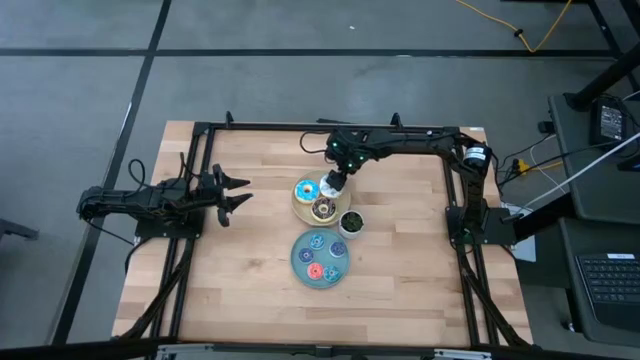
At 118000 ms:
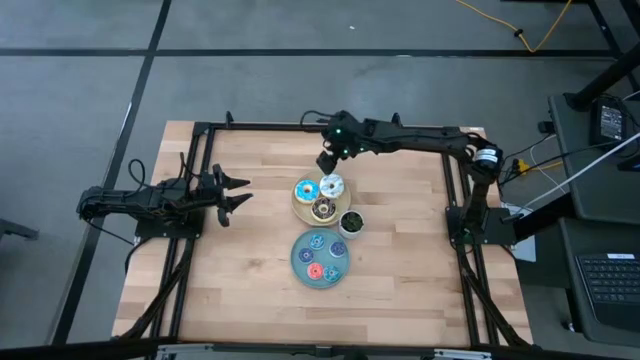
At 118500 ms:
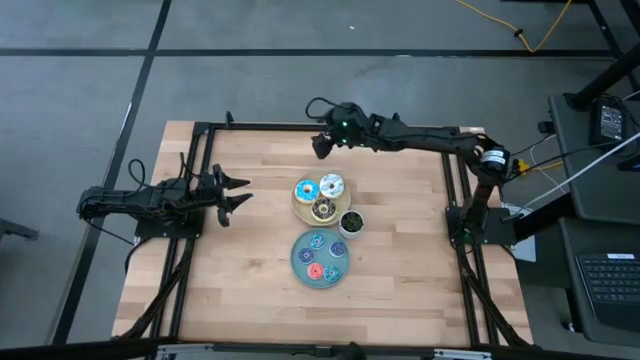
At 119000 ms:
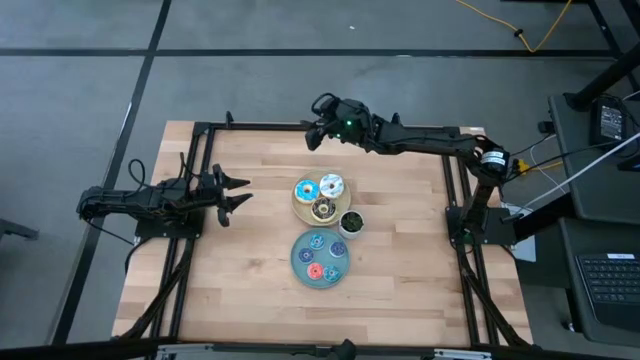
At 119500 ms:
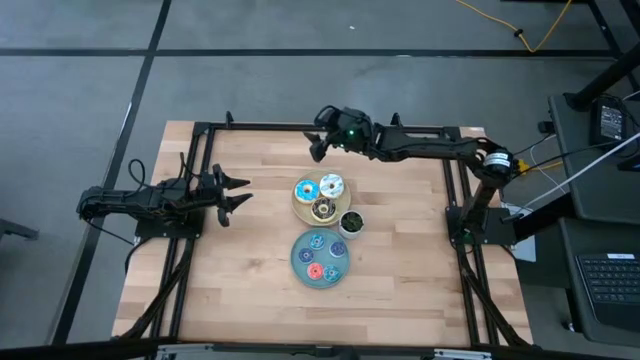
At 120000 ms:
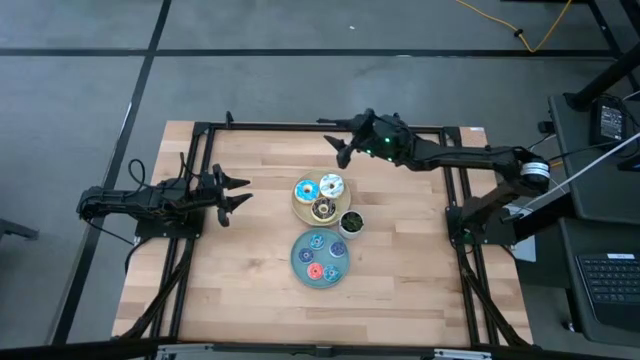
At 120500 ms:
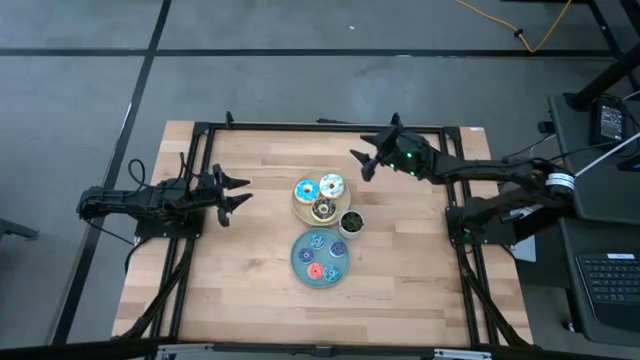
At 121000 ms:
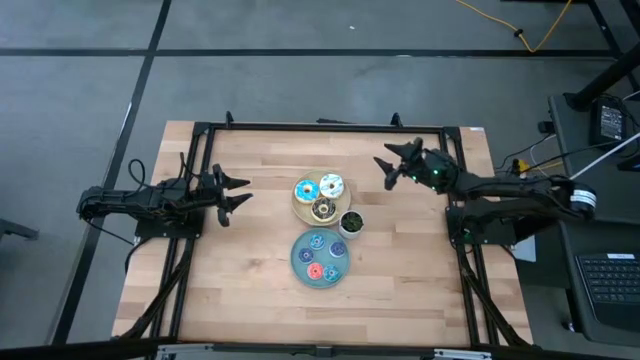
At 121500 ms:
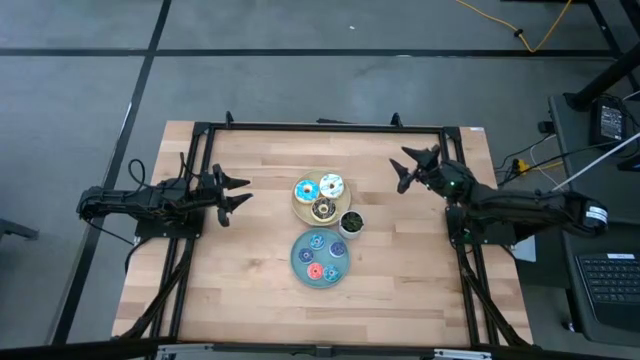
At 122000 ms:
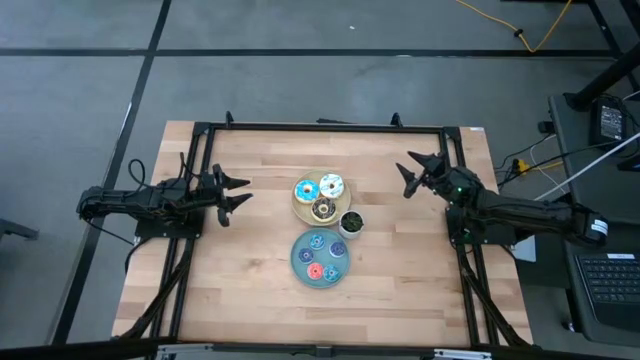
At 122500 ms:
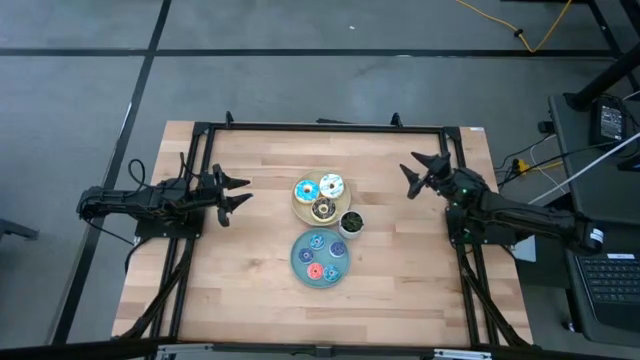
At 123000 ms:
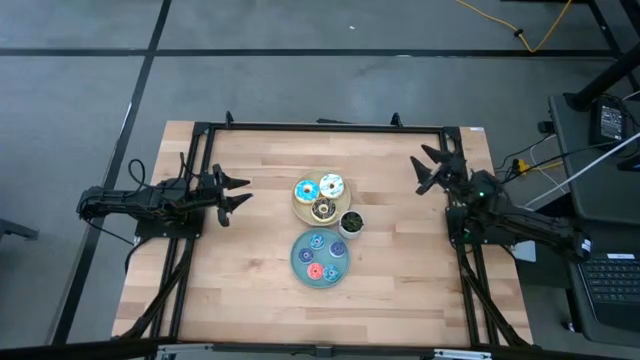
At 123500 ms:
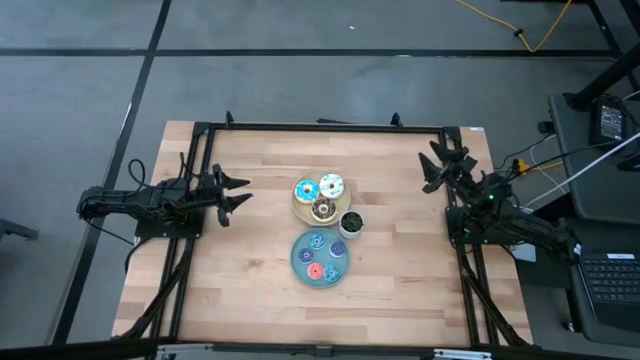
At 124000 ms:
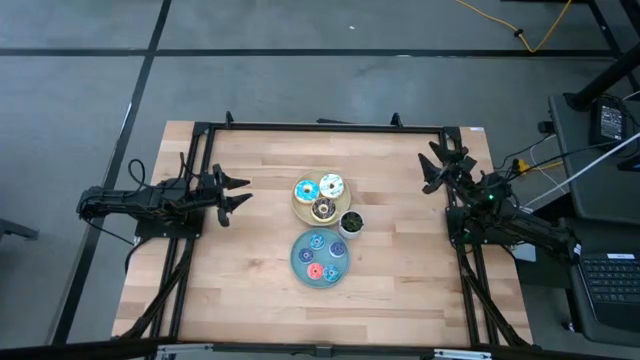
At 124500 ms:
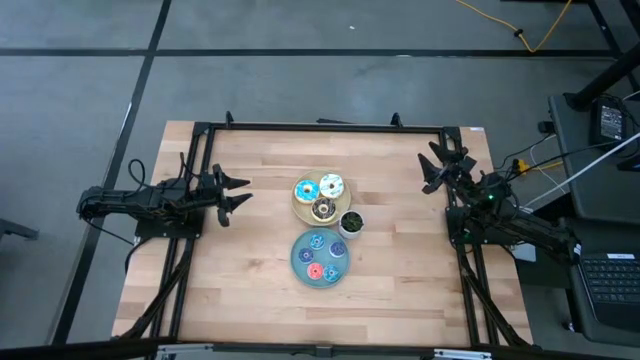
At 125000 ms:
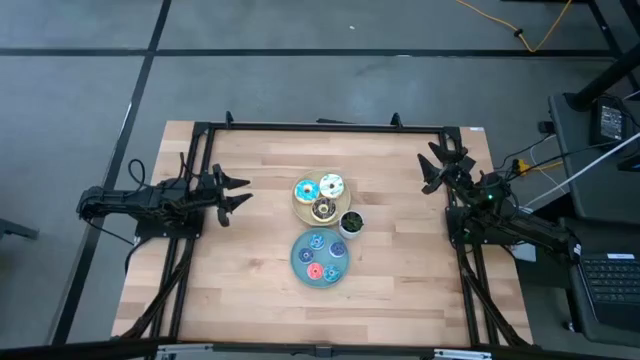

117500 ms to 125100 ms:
Task: Pick & Place donuts
Return to Home Position

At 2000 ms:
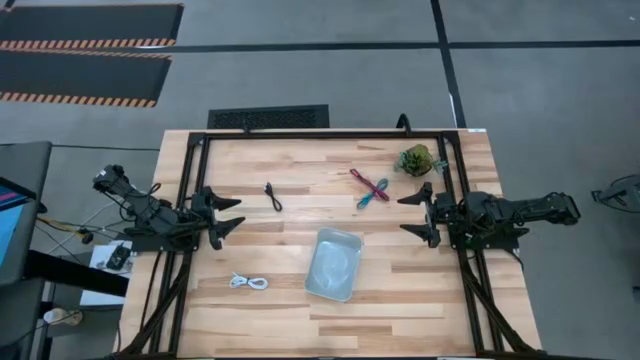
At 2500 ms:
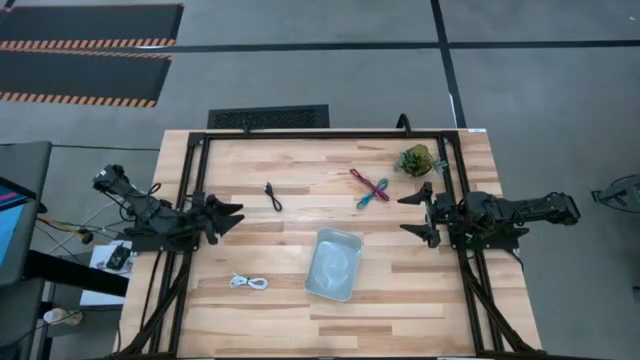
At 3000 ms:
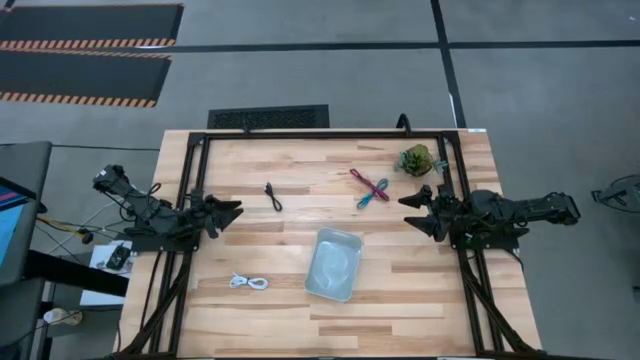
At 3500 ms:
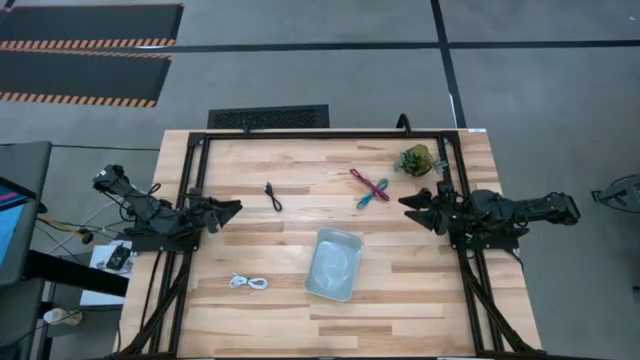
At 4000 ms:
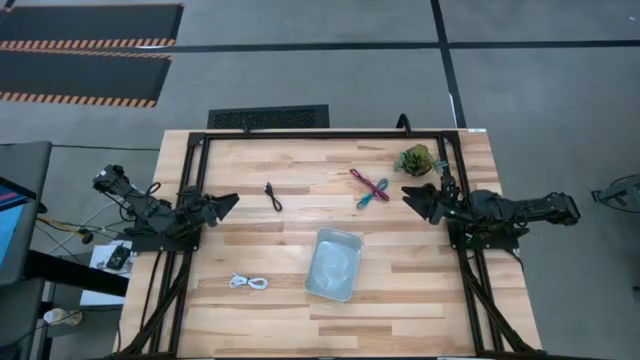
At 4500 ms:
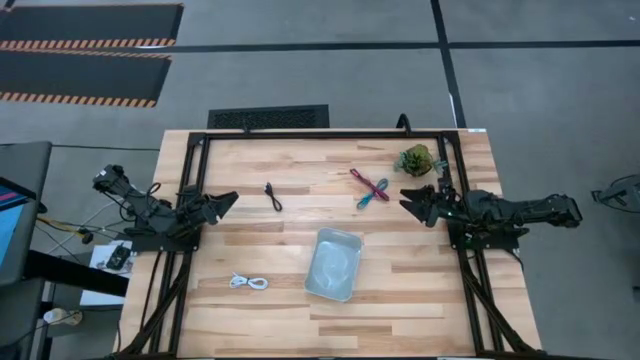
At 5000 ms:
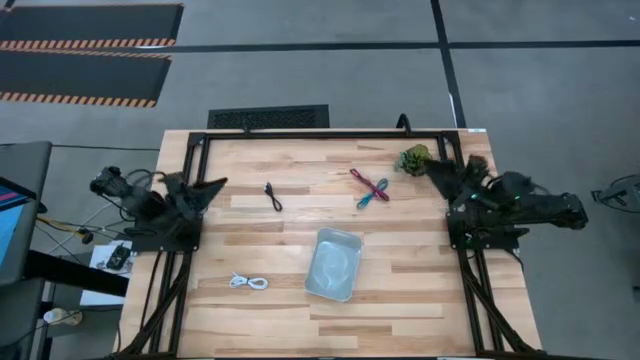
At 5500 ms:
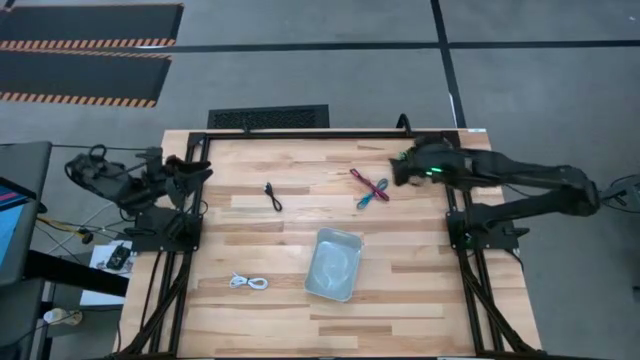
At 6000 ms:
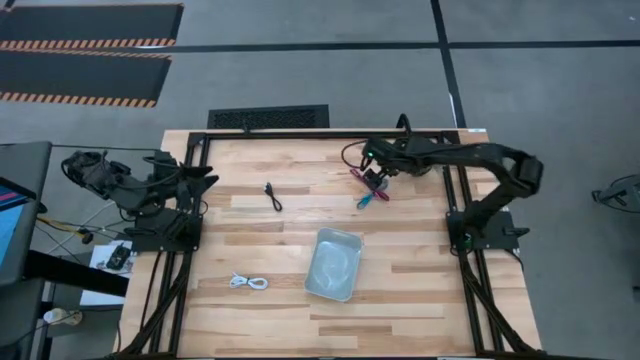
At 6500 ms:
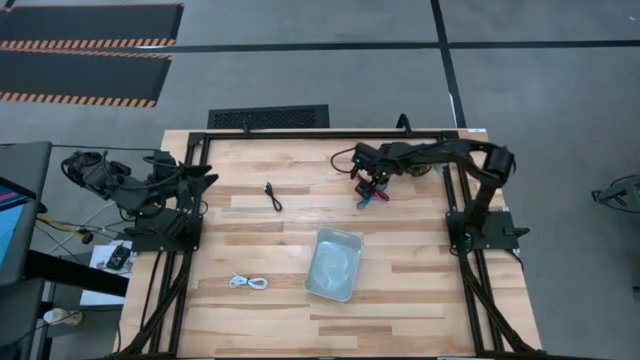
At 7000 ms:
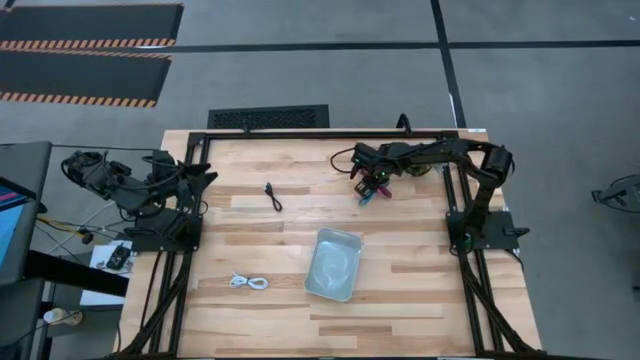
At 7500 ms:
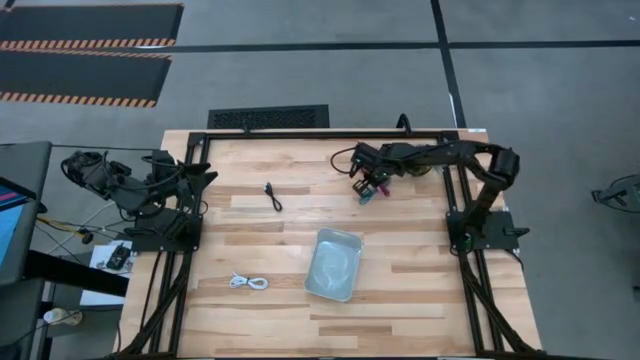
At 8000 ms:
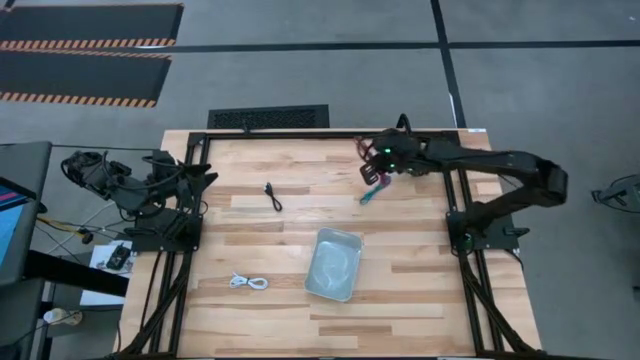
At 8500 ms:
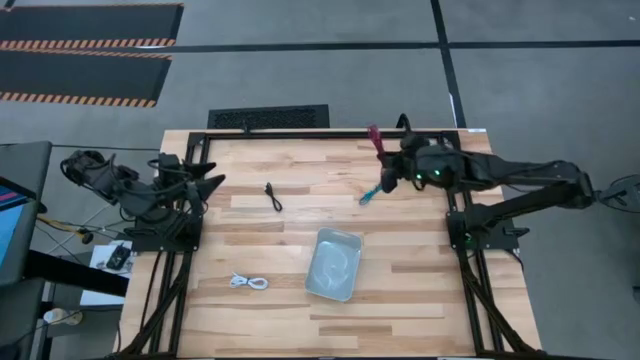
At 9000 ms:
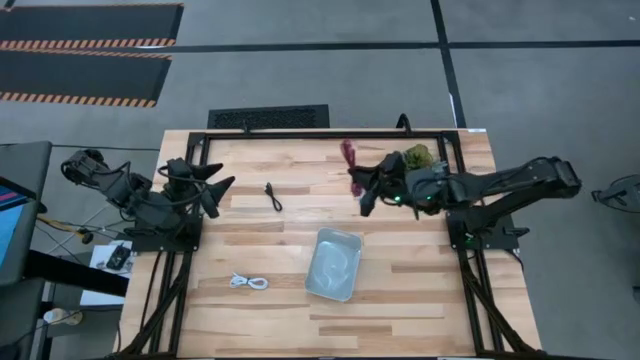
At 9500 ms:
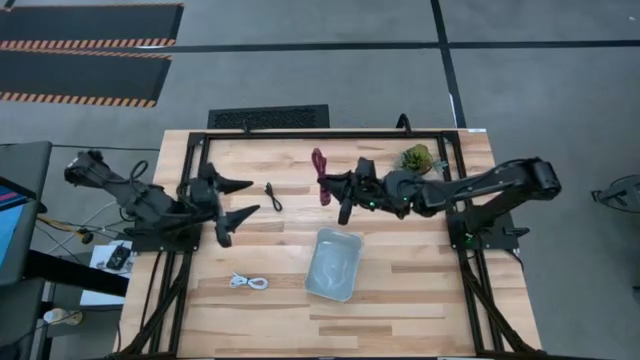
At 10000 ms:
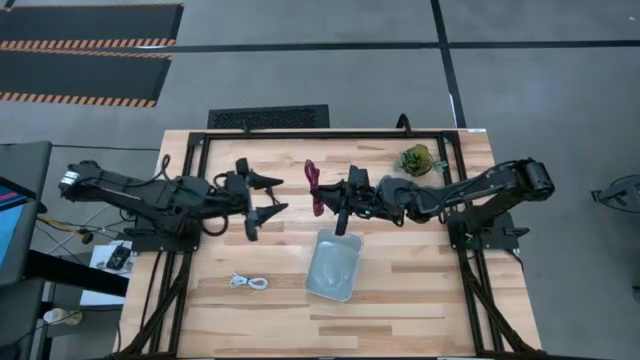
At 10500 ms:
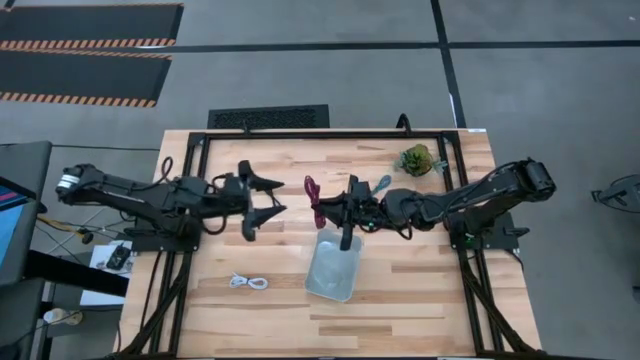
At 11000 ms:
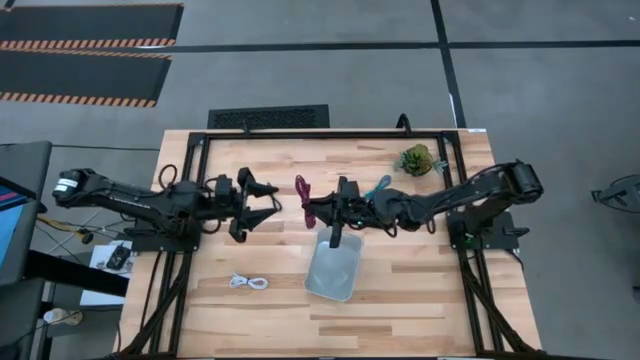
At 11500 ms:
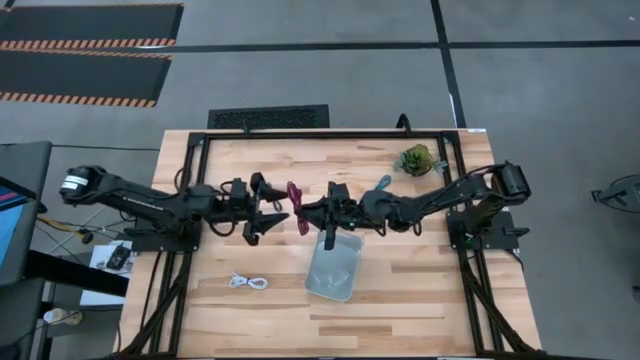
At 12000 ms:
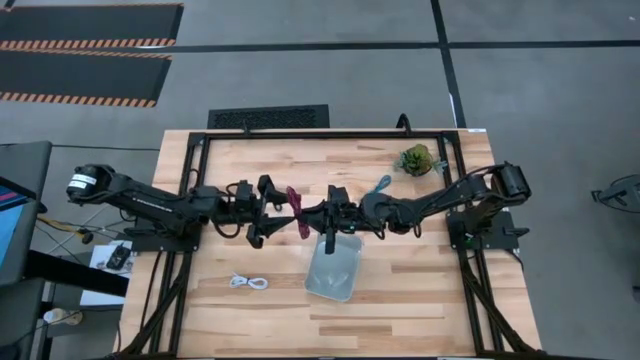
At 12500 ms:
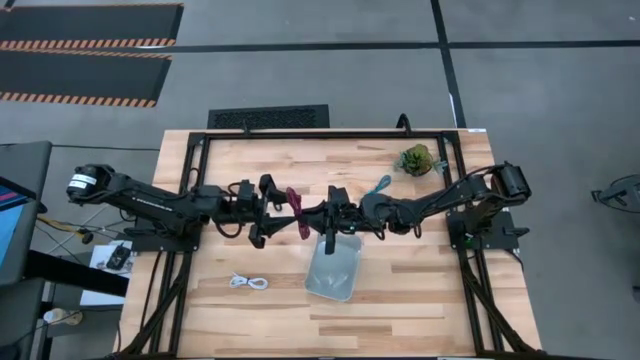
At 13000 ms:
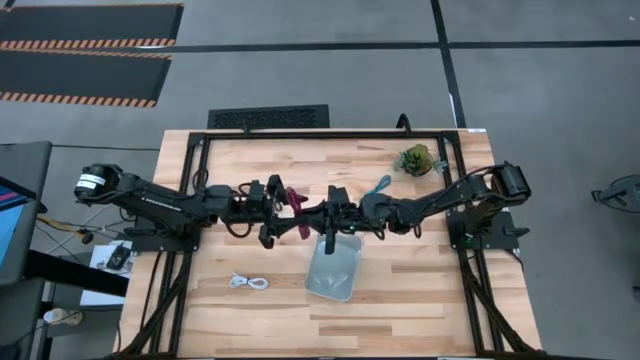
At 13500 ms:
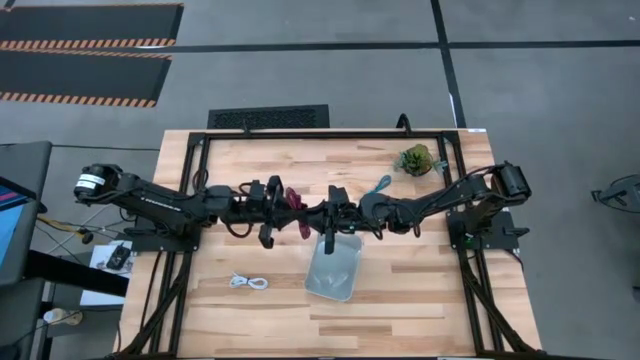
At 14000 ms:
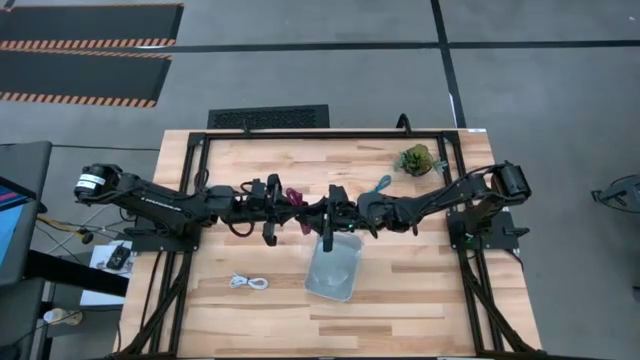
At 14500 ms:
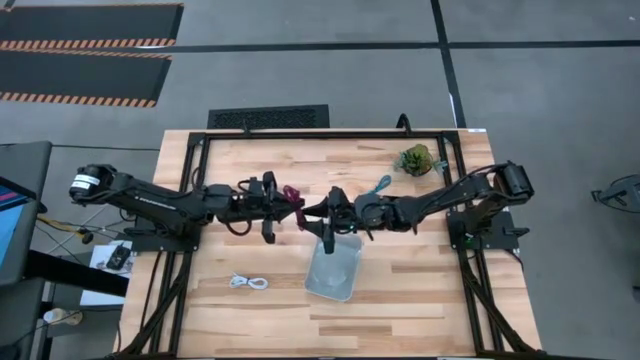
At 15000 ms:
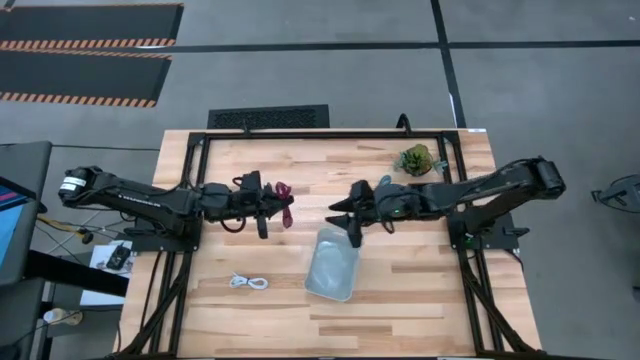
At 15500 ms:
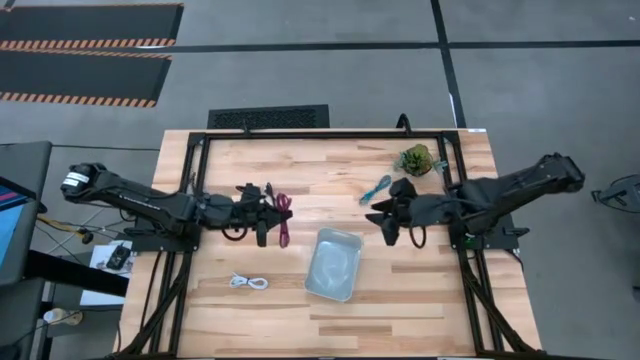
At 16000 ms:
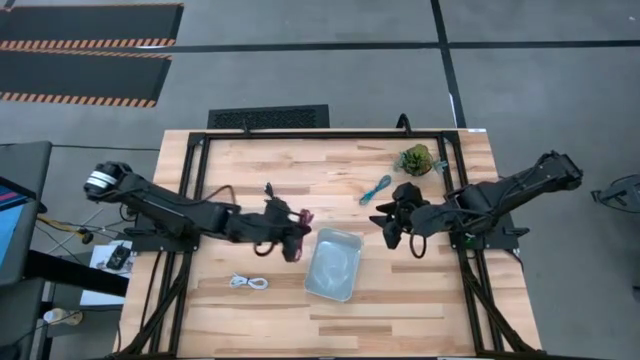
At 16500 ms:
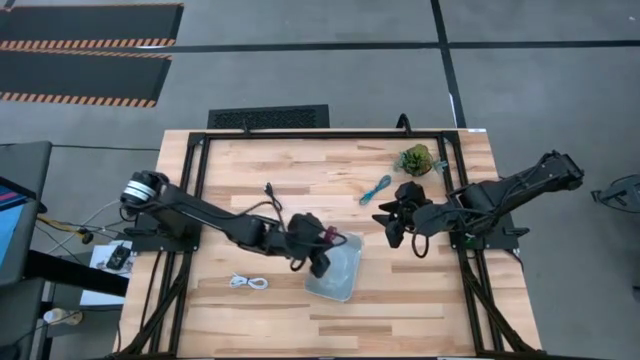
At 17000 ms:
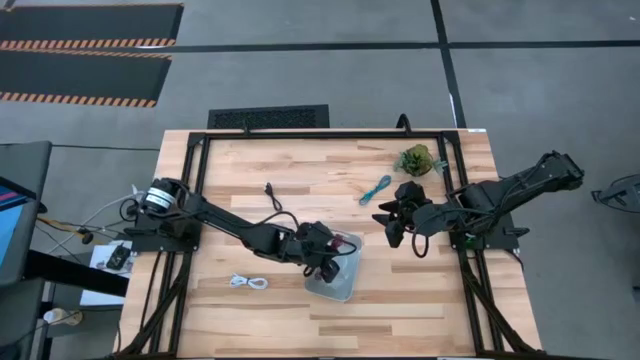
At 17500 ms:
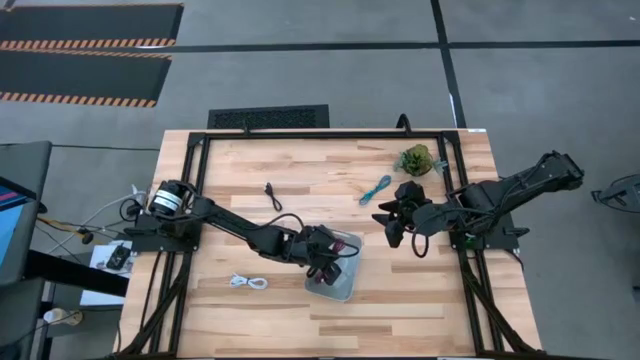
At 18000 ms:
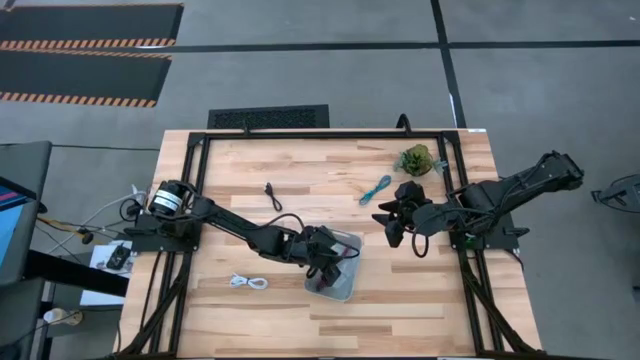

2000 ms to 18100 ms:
Task: Pick and place USB-C Cables
Put the pink charger cable into the gray bin
